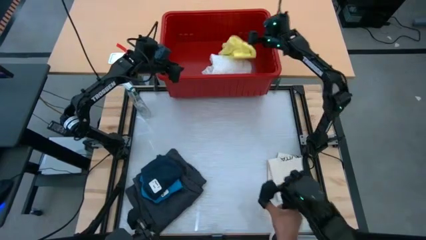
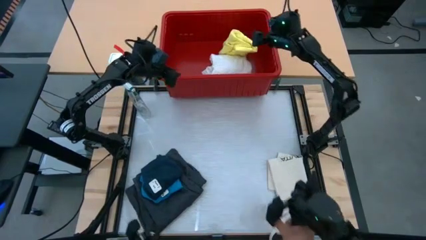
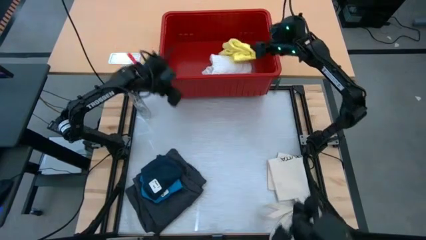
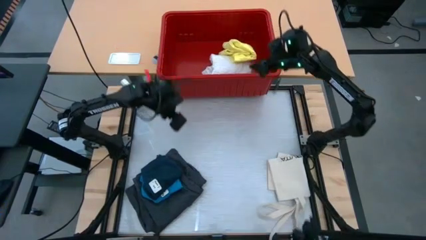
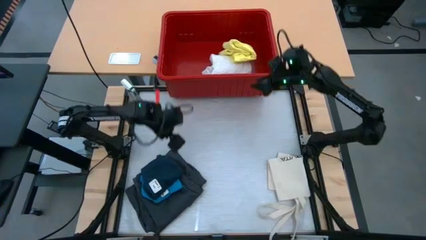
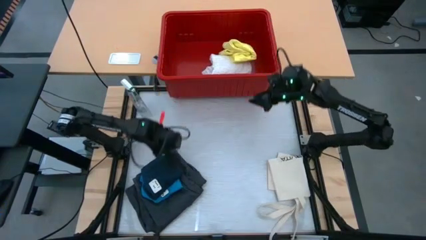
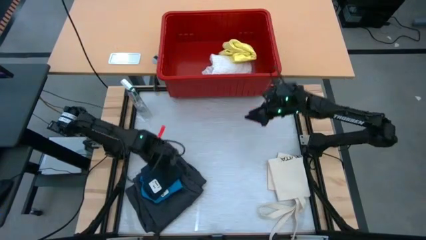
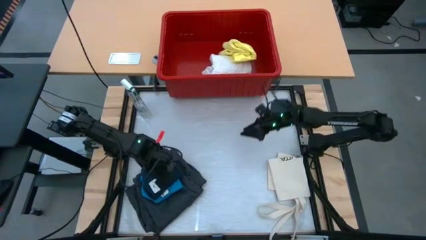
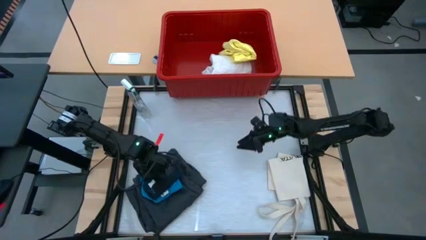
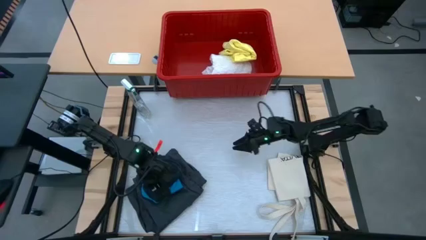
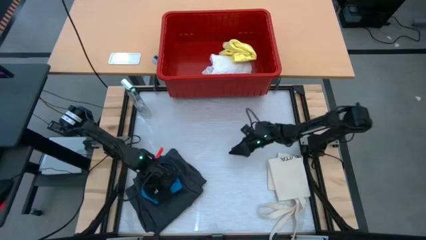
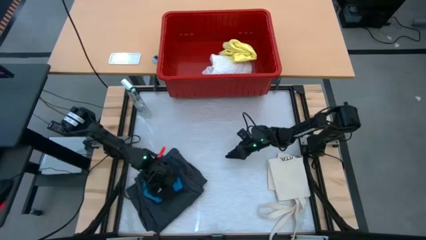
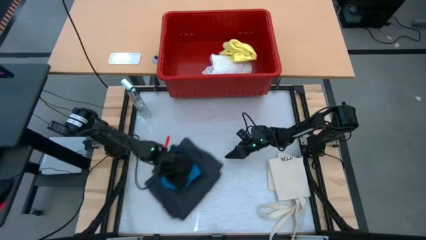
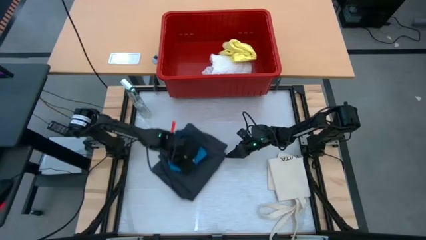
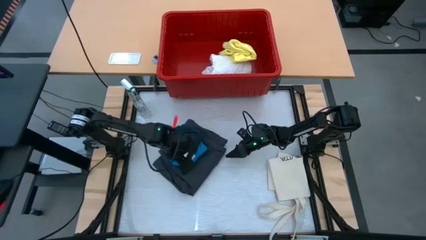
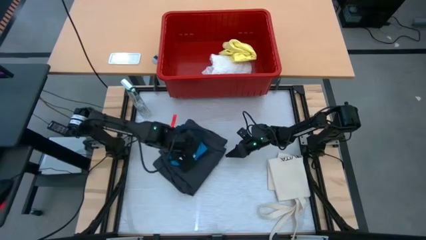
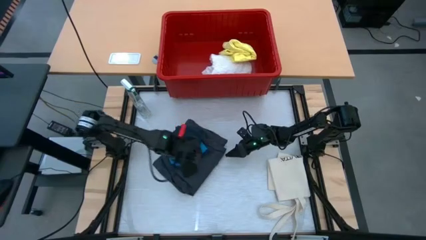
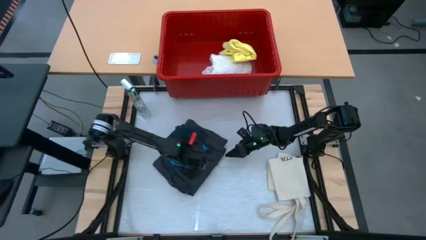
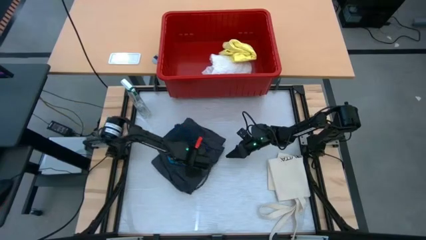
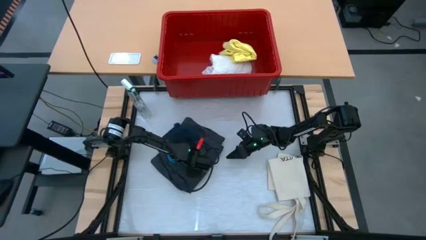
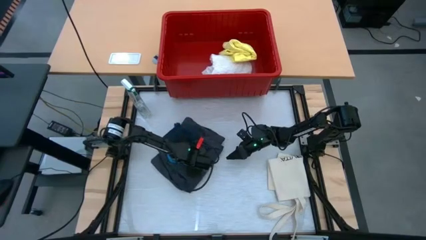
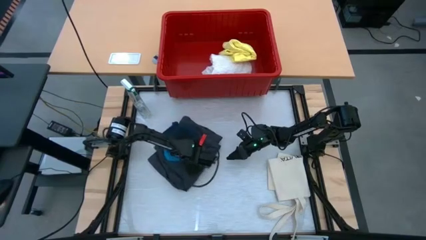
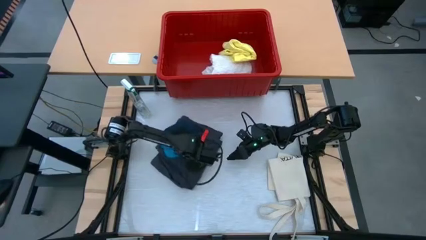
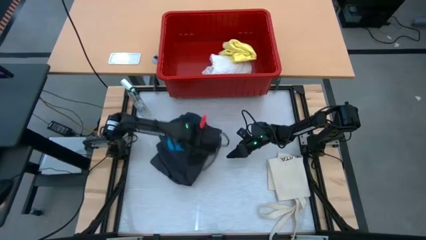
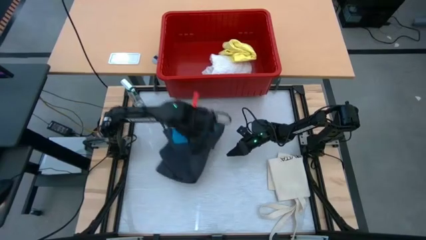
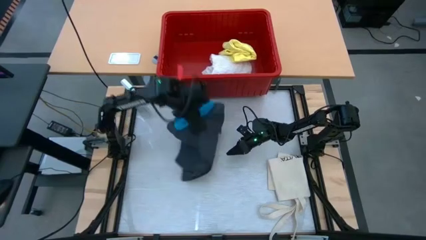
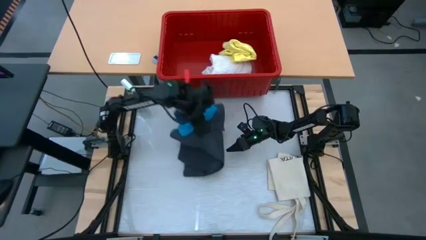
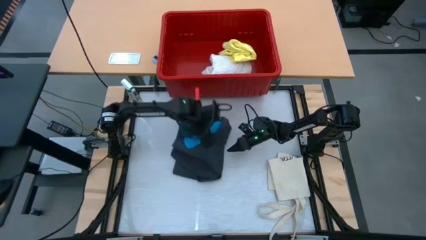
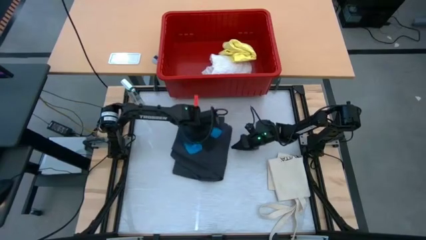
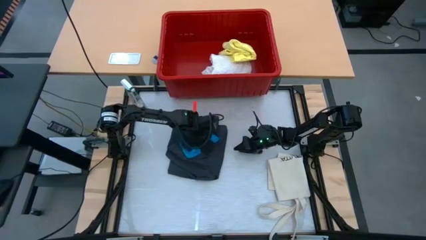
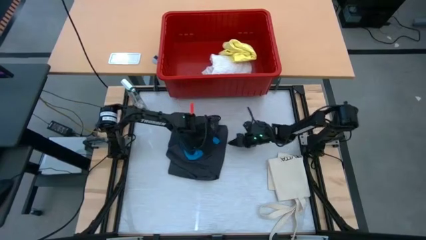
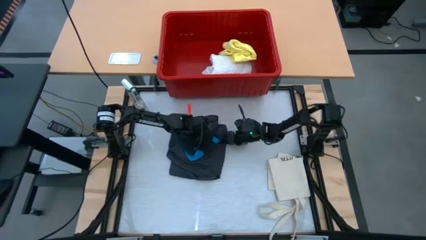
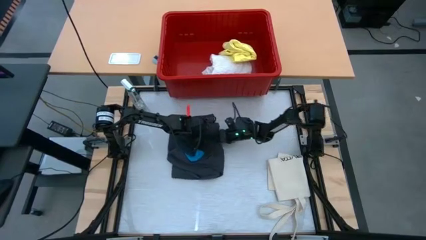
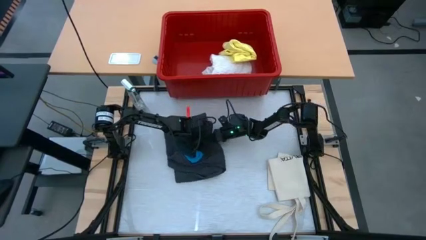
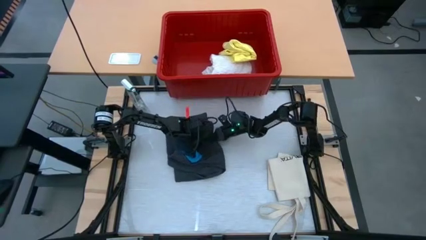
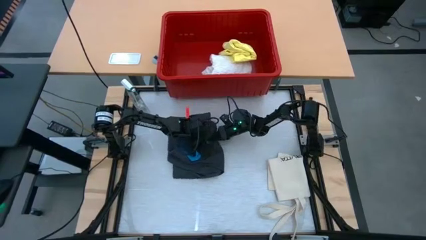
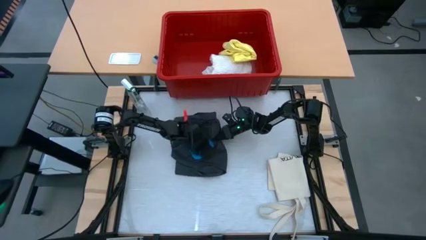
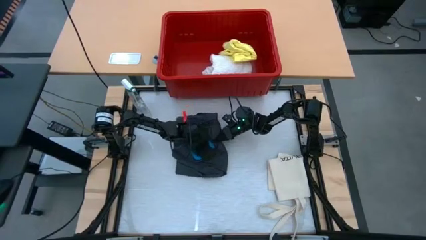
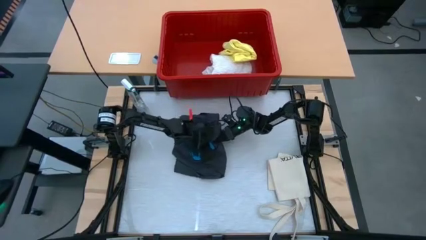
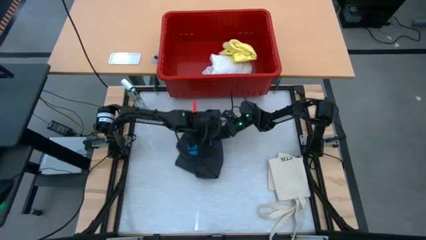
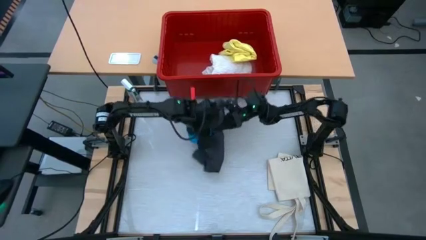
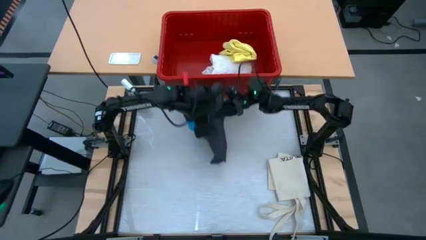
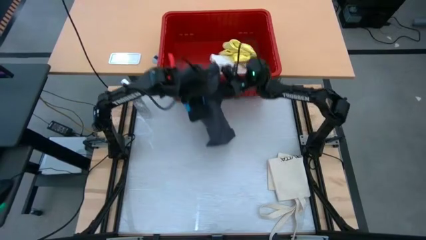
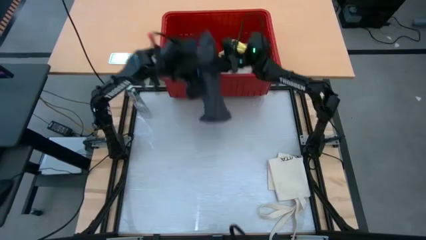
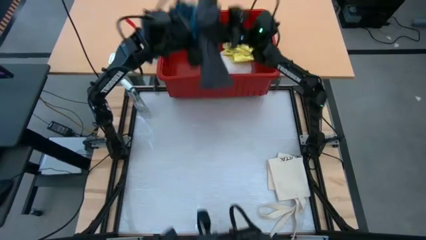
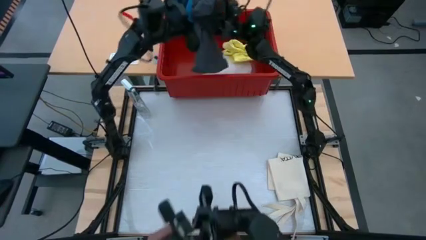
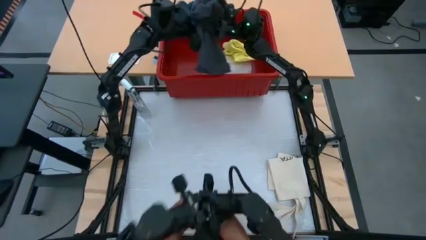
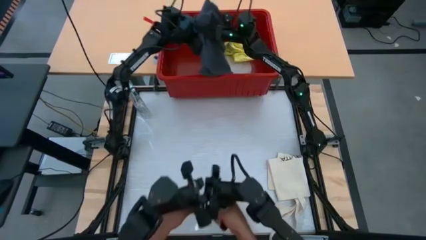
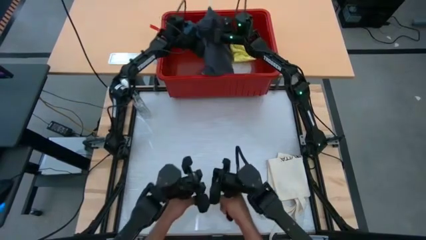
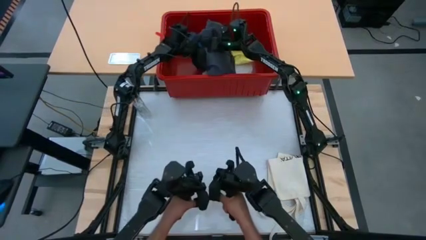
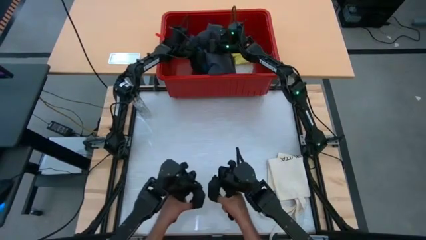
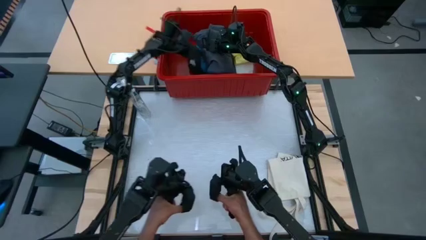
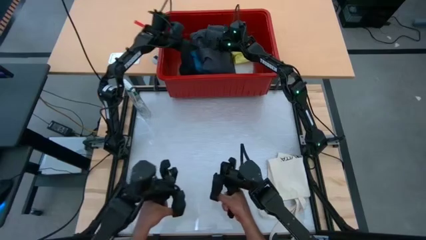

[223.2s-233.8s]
Task: Fold laundry
Put the stacked shorts into the red laundry bin

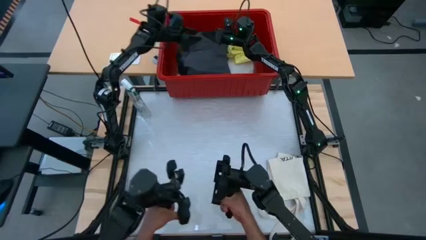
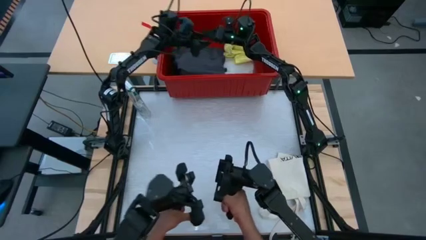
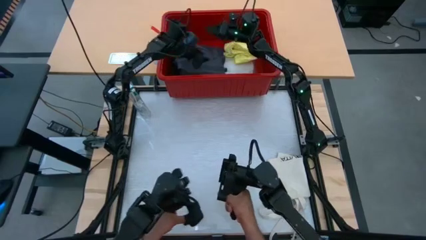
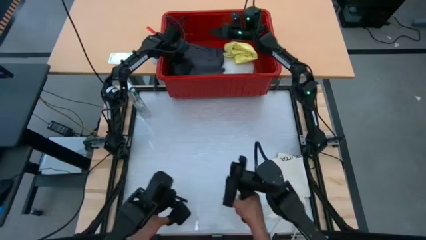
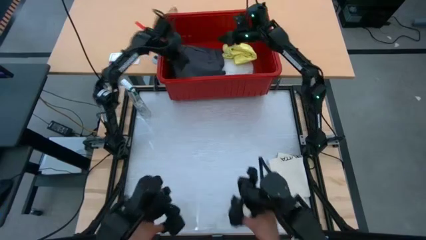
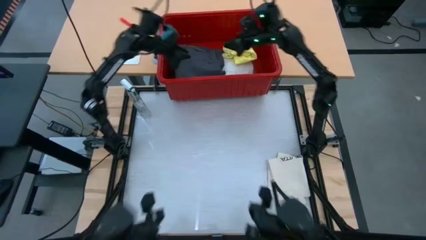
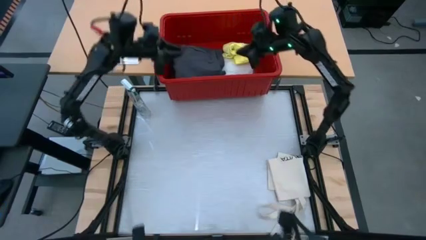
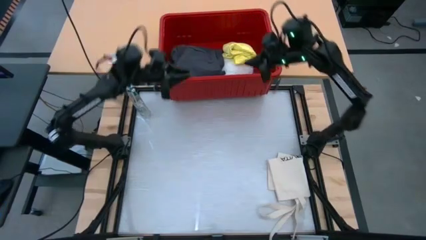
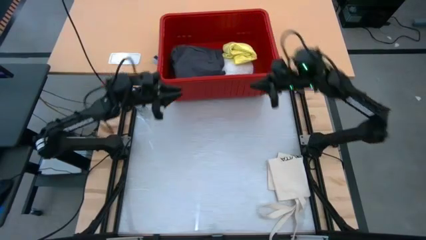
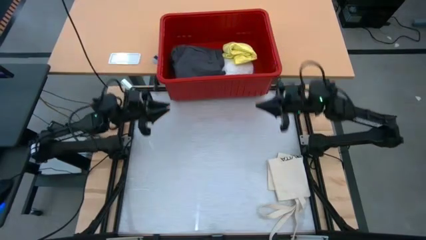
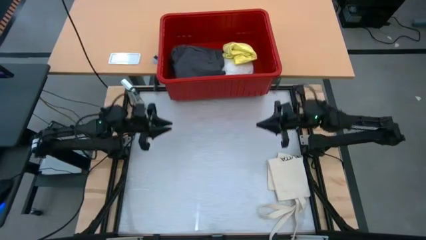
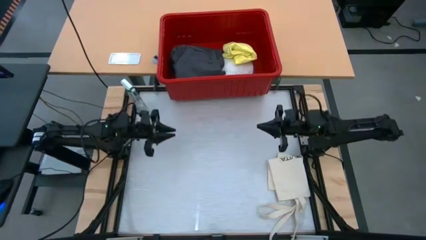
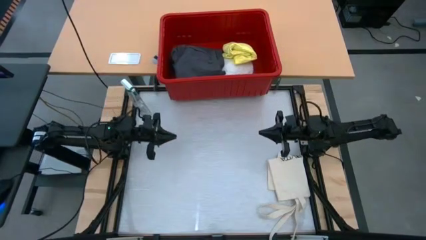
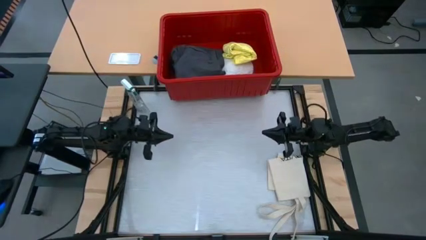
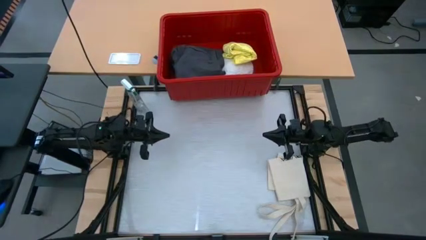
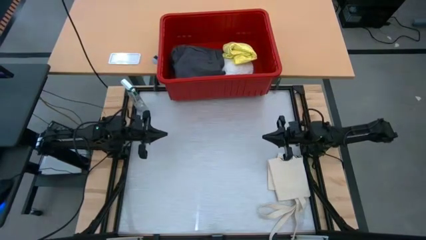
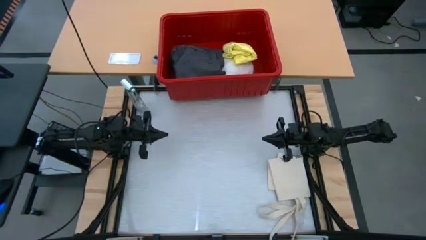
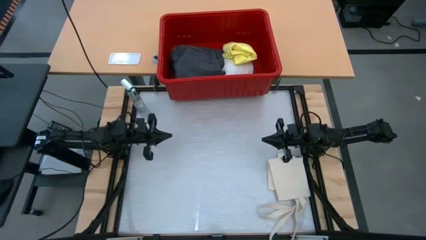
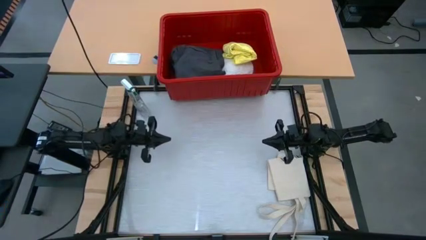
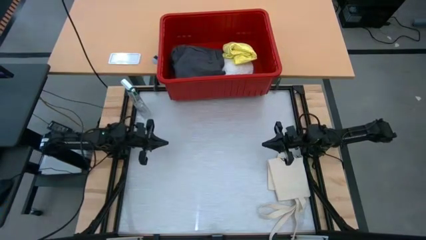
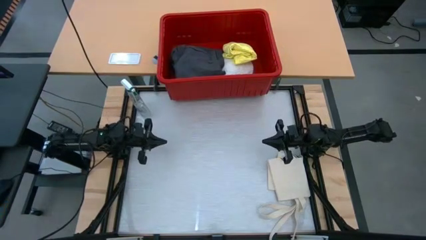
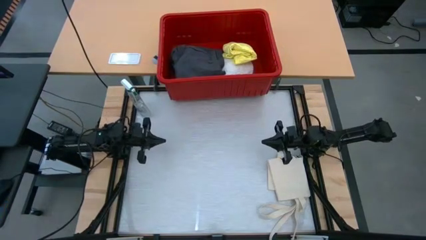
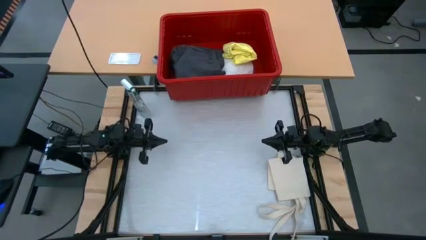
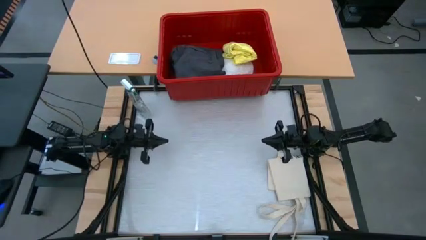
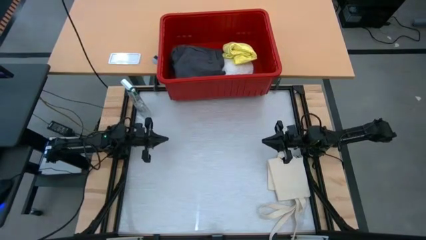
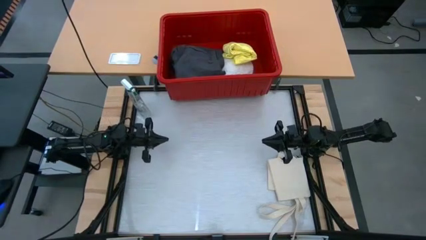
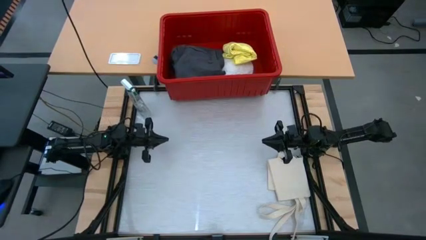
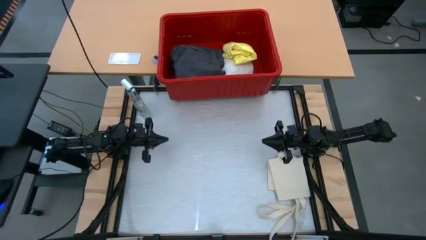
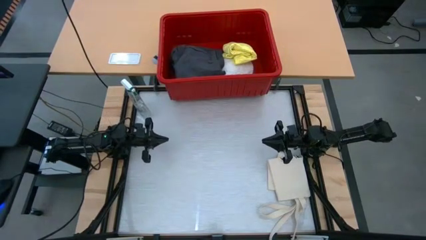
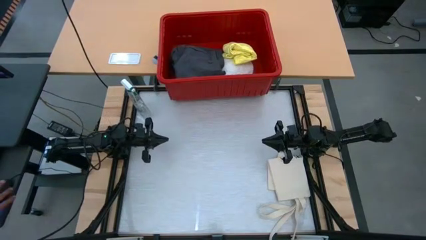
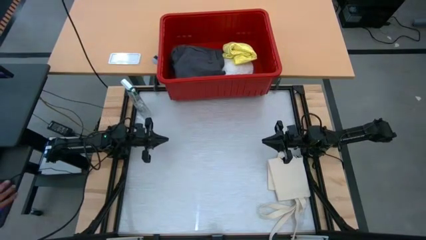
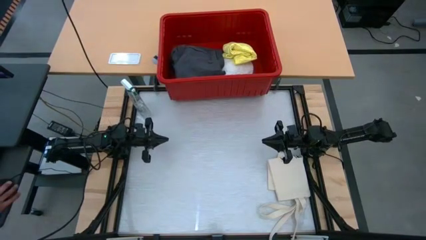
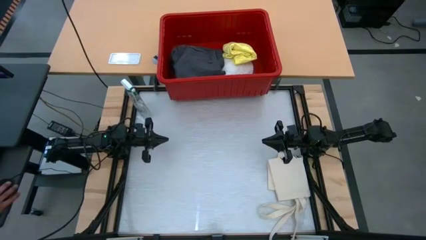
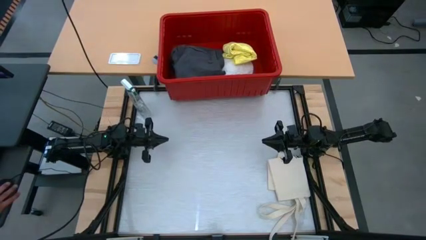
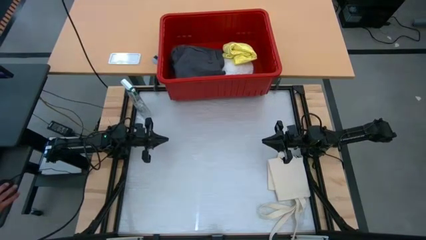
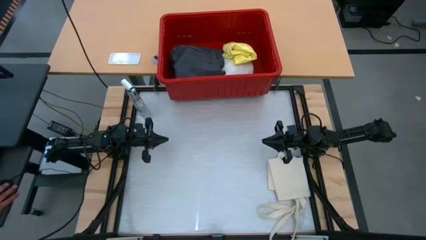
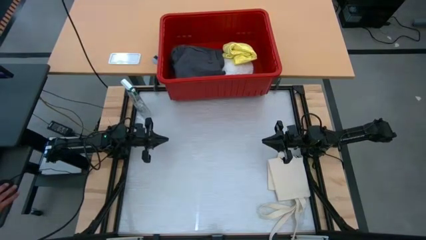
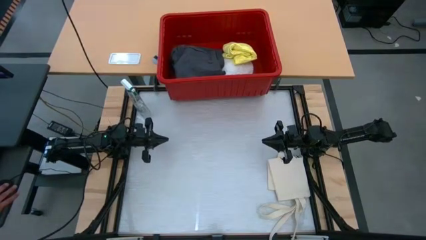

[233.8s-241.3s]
Return to Home Position
